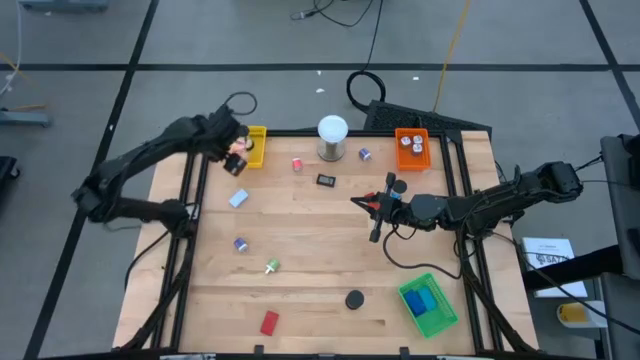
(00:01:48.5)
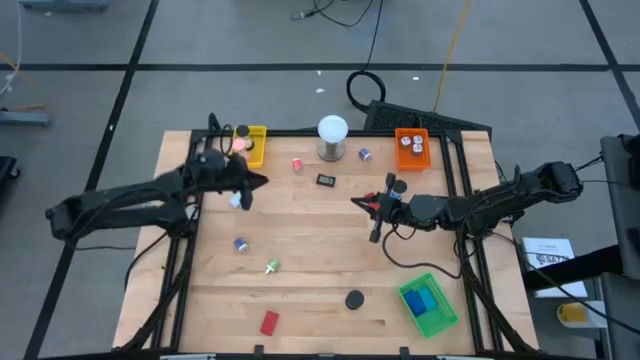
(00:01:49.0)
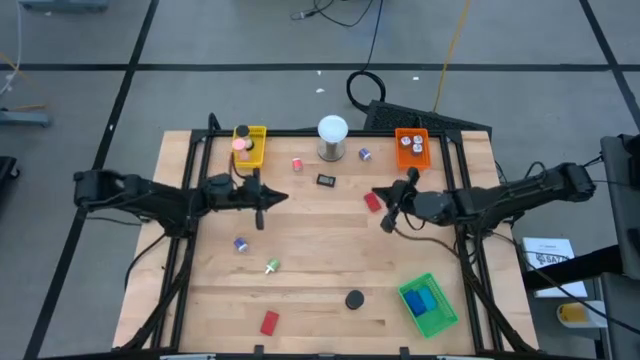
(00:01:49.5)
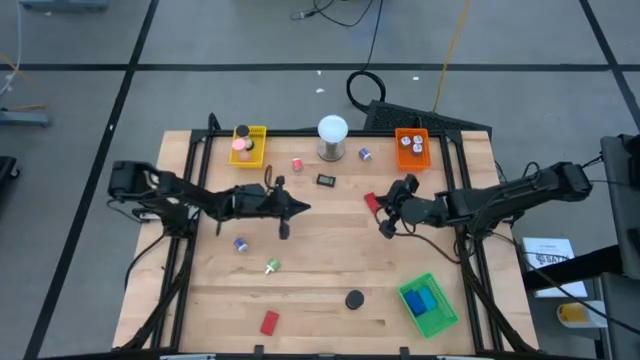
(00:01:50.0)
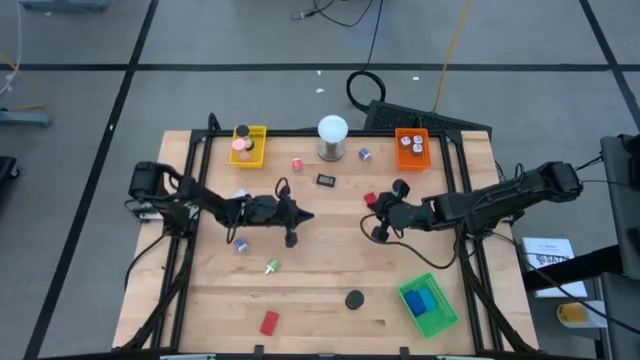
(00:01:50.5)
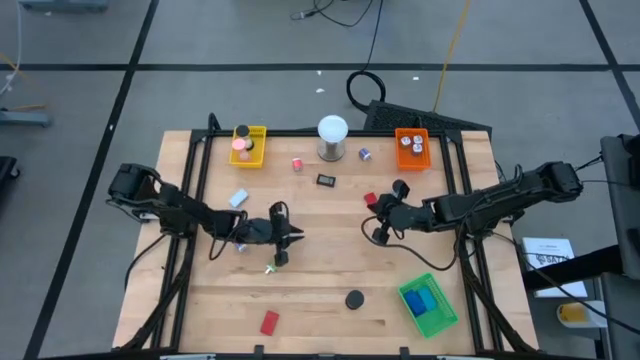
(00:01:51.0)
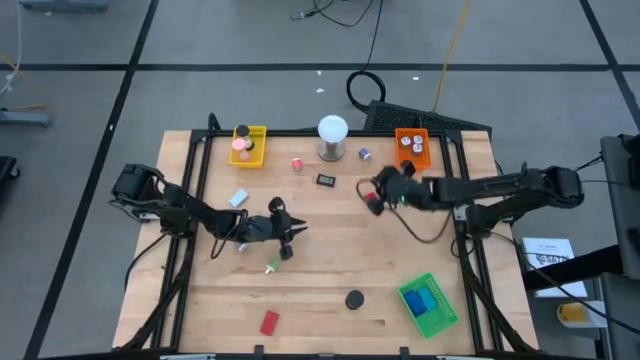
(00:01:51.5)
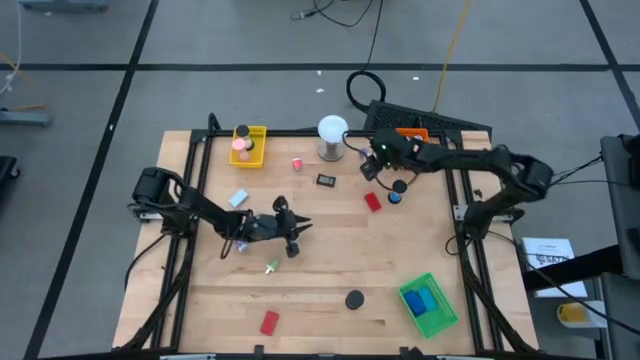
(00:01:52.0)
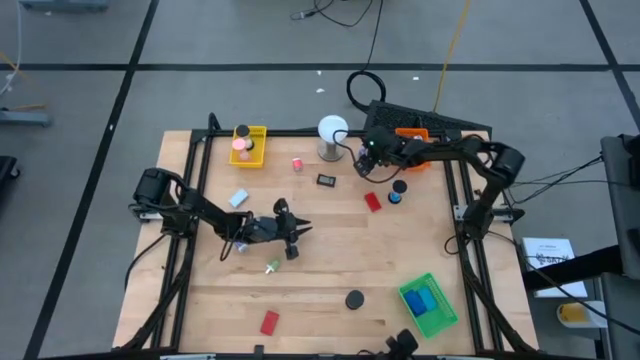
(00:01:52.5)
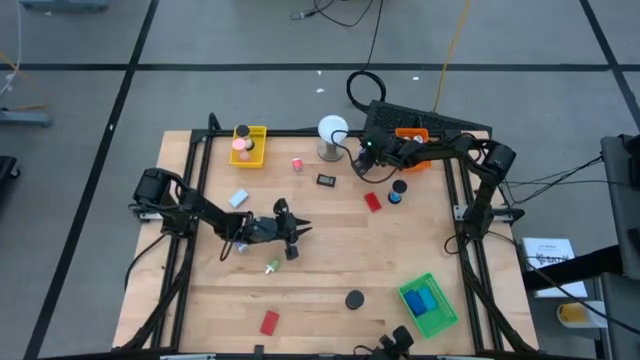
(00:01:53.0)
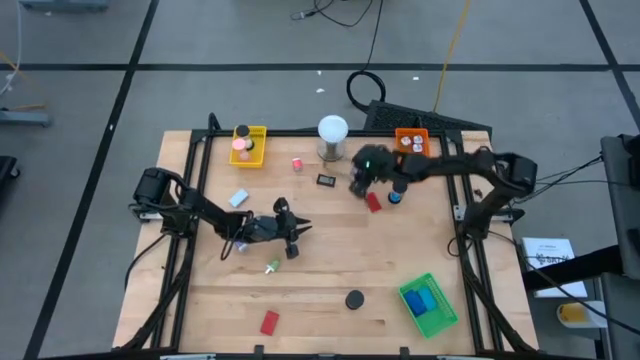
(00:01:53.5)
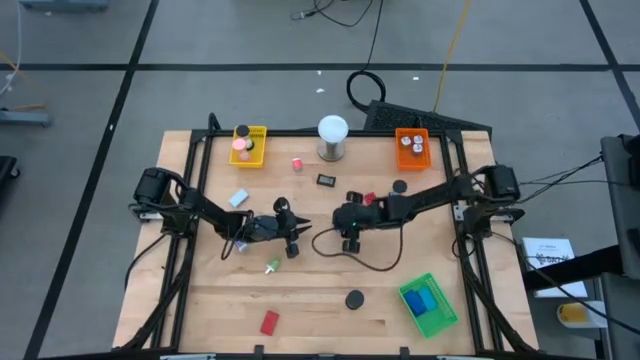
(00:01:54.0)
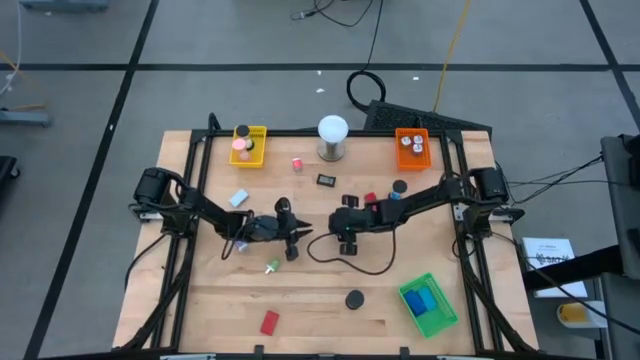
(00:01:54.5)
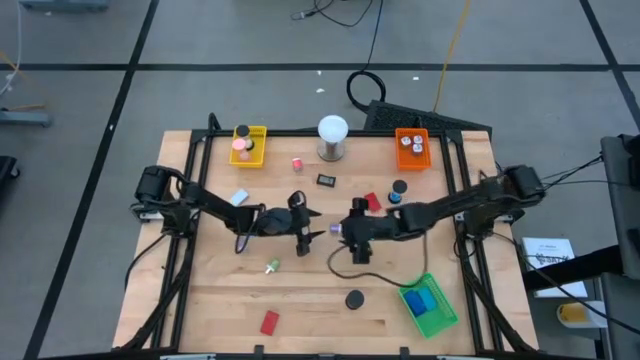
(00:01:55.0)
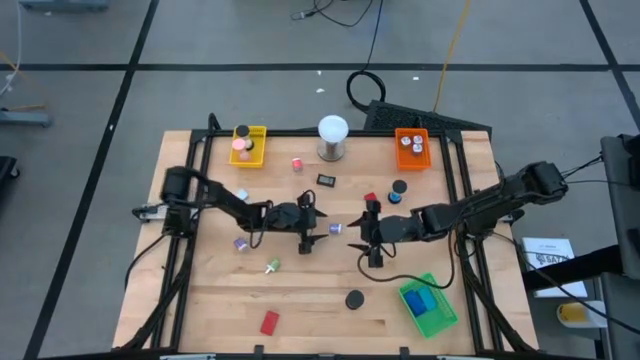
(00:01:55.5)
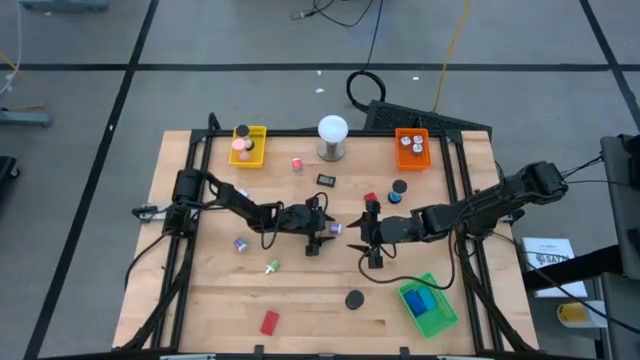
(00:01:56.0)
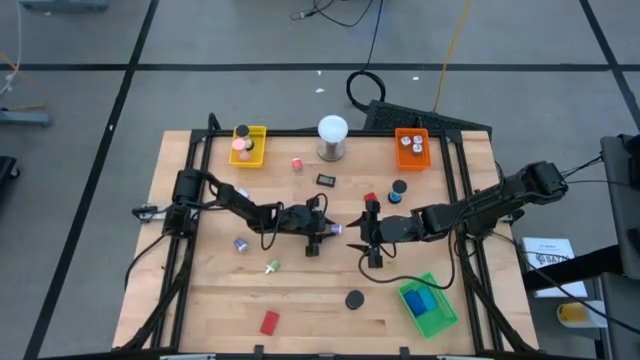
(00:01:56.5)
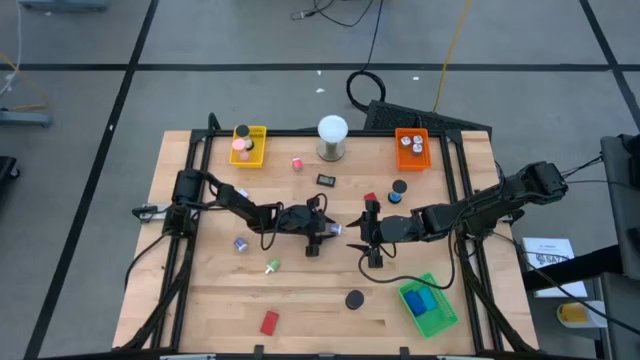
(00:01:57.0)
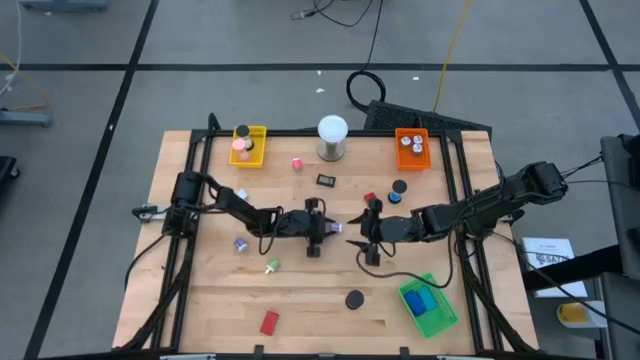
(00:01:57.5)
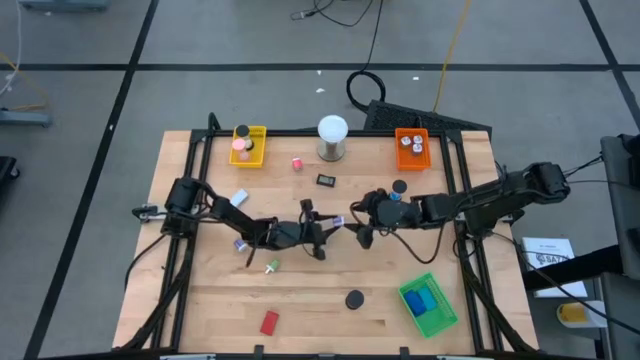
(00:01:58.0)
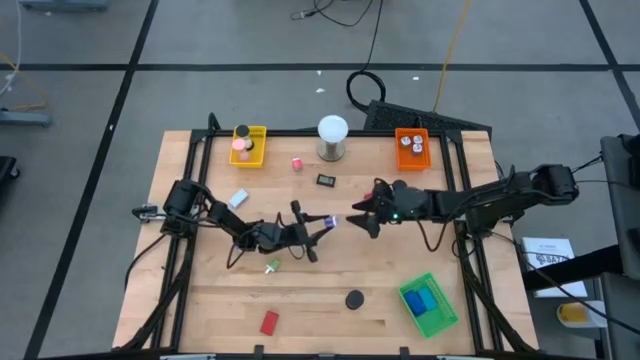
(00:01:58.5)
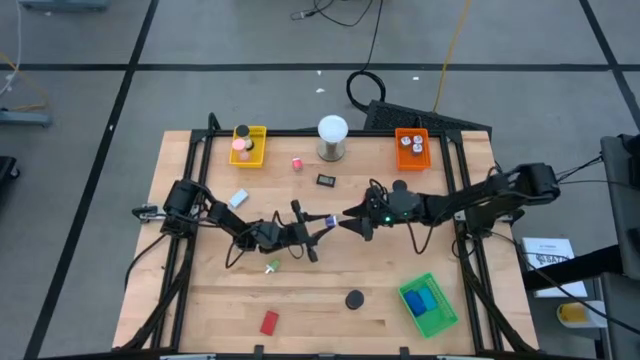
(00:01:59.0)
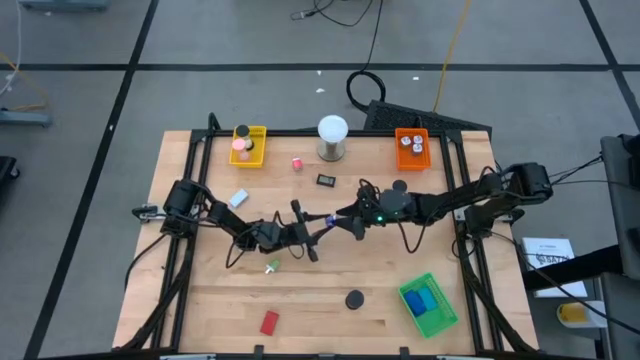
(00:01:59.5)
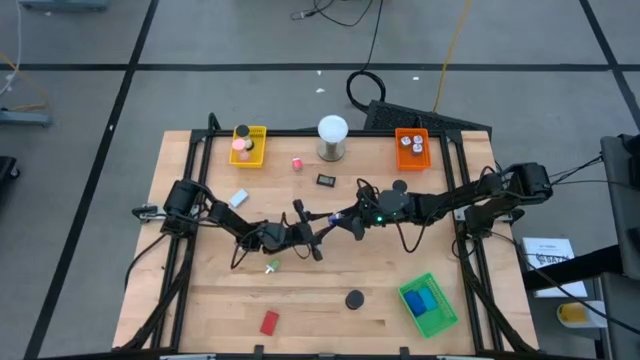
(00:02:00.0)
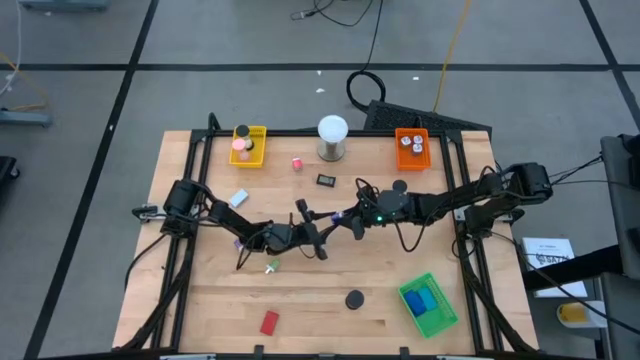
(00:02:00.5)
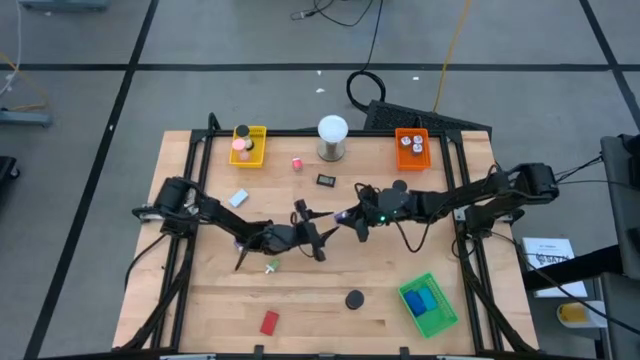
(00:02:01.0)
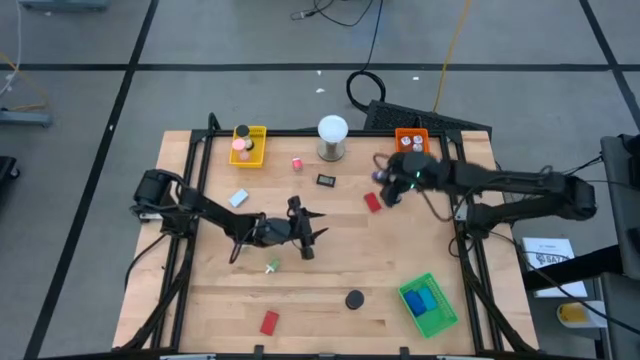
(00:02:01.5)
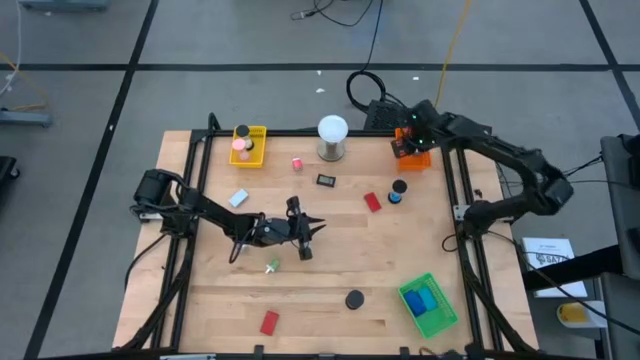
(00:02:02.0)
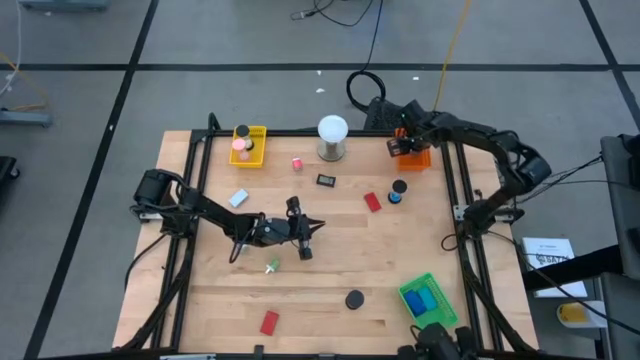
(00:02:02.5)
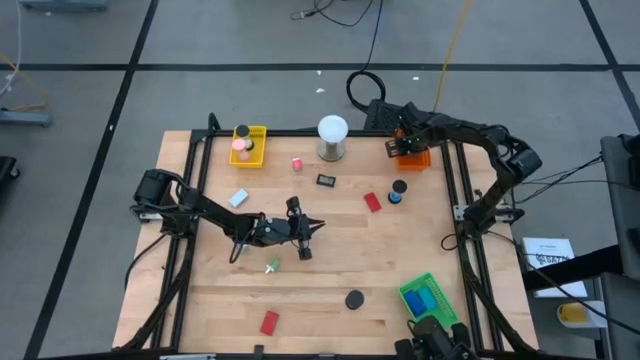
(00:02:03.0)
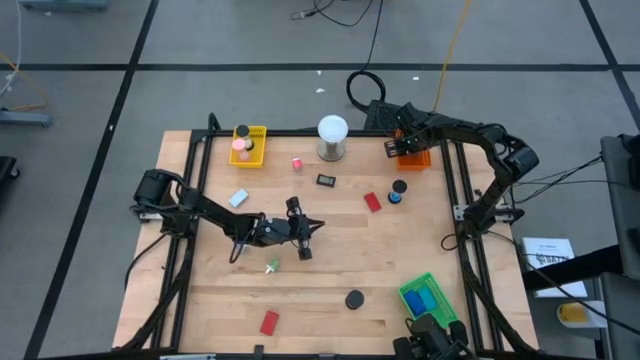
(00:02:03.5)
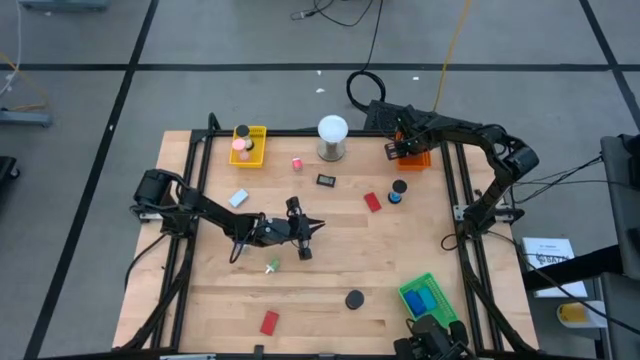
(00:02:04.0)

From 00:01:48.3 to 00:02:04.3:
Task: Pick & Place Office items
Put the top violet charger adaptor into the orange bin
